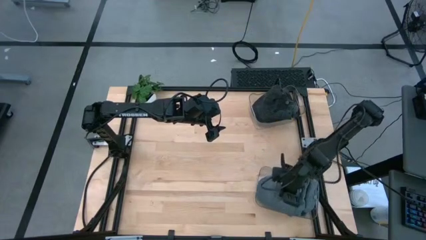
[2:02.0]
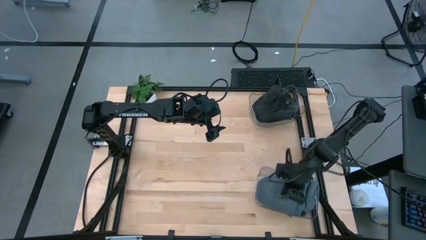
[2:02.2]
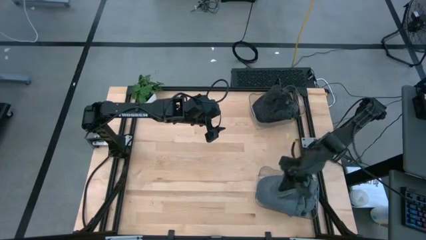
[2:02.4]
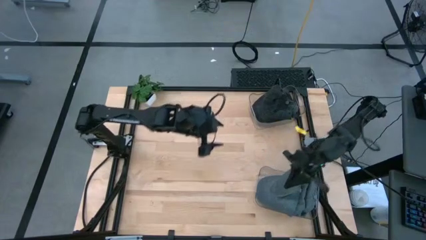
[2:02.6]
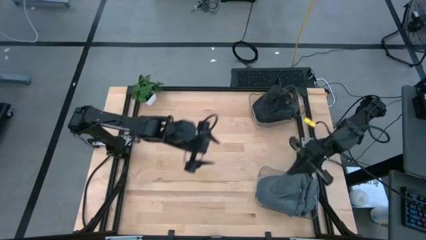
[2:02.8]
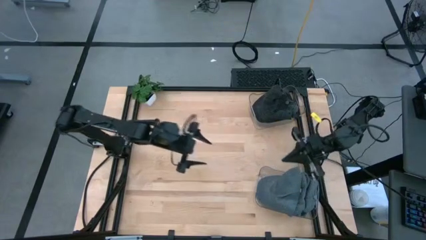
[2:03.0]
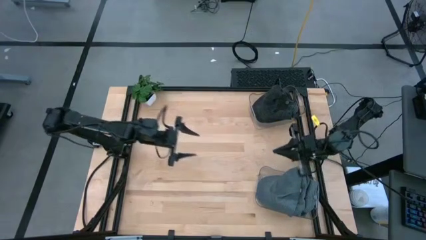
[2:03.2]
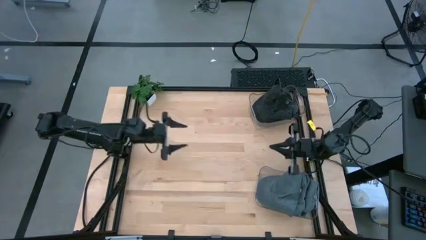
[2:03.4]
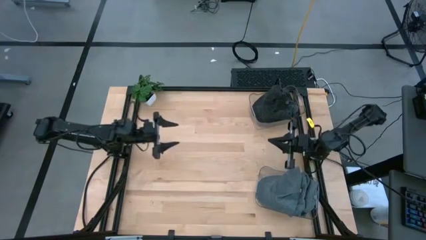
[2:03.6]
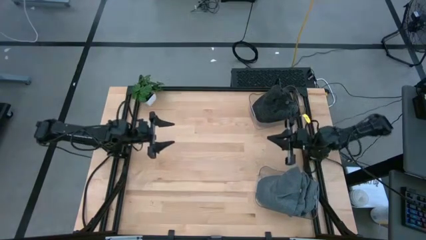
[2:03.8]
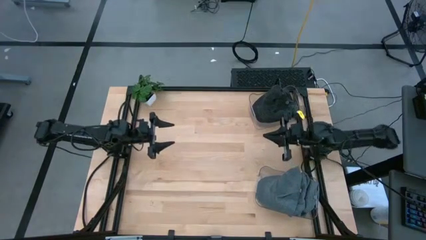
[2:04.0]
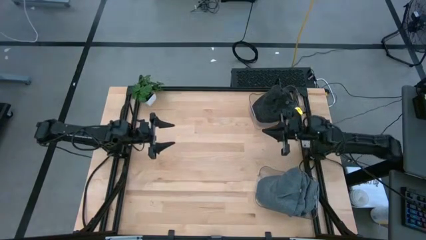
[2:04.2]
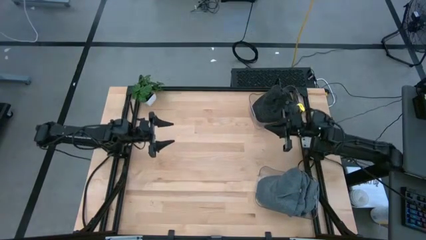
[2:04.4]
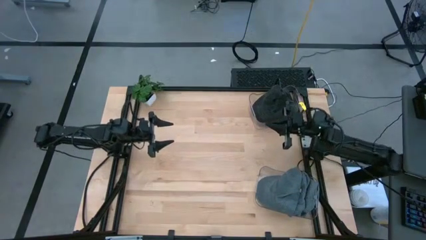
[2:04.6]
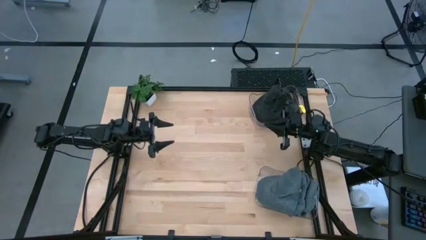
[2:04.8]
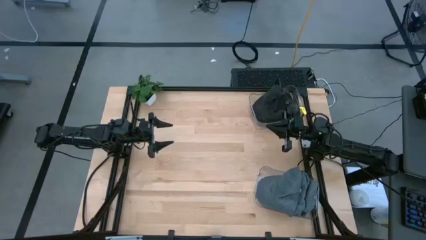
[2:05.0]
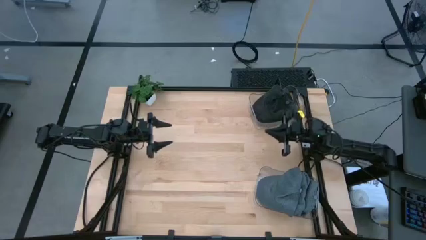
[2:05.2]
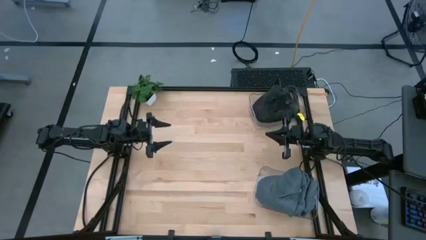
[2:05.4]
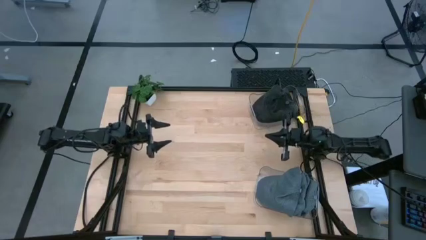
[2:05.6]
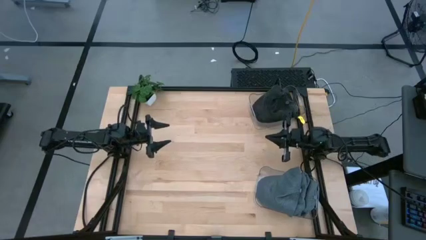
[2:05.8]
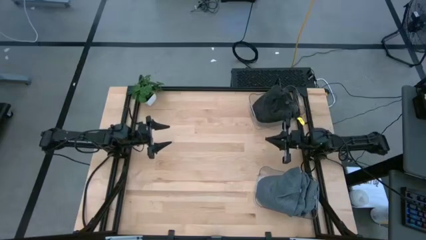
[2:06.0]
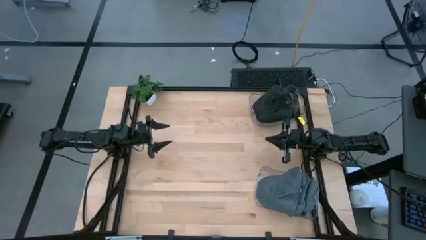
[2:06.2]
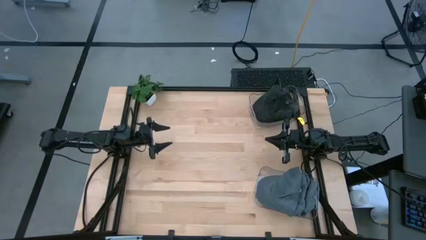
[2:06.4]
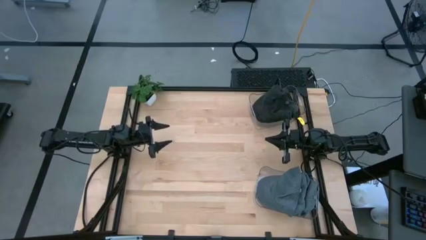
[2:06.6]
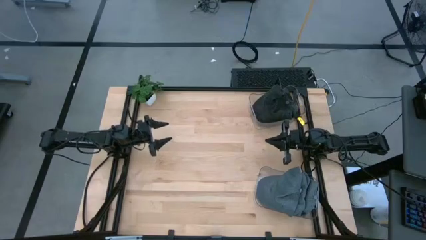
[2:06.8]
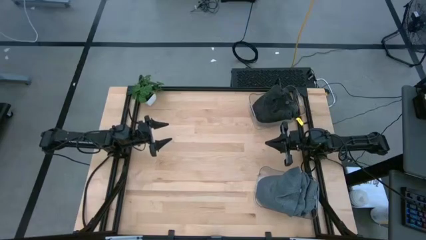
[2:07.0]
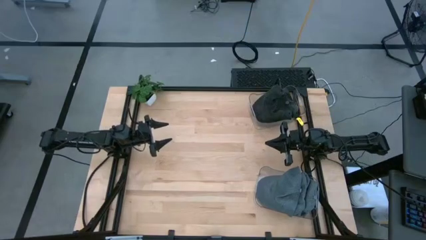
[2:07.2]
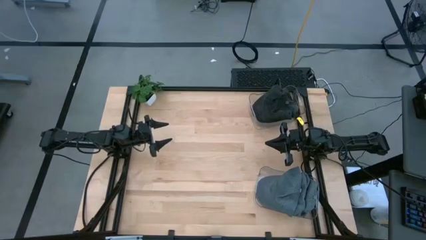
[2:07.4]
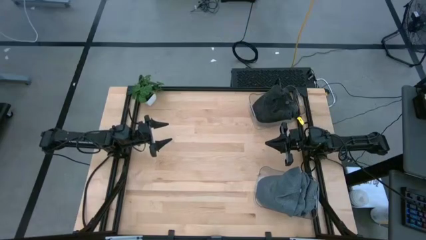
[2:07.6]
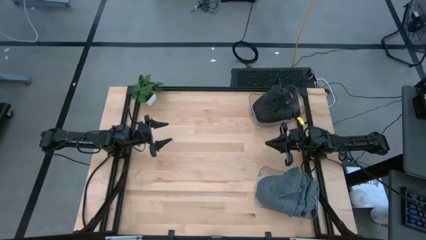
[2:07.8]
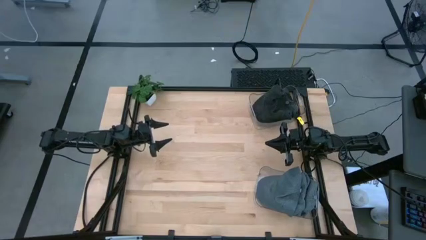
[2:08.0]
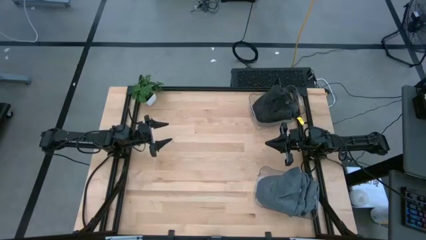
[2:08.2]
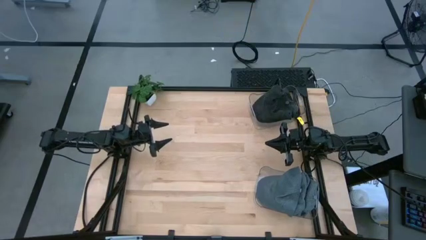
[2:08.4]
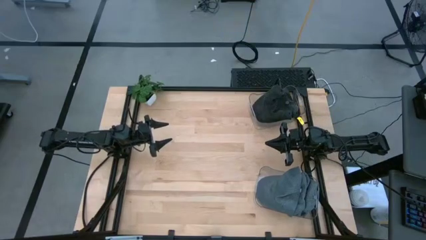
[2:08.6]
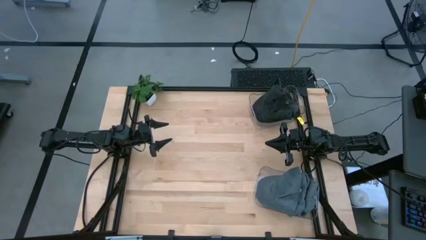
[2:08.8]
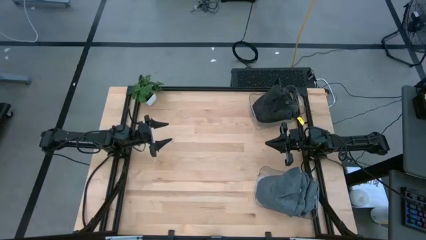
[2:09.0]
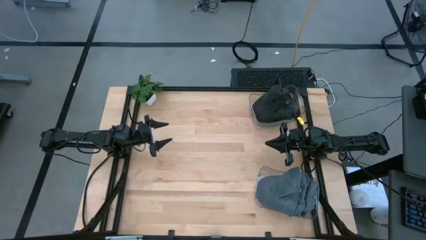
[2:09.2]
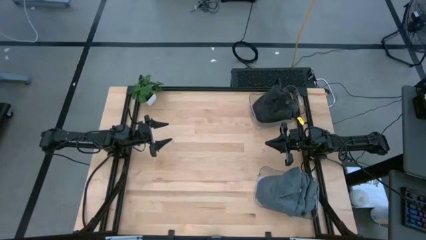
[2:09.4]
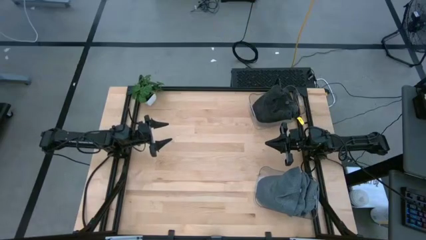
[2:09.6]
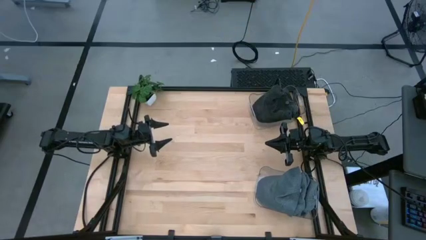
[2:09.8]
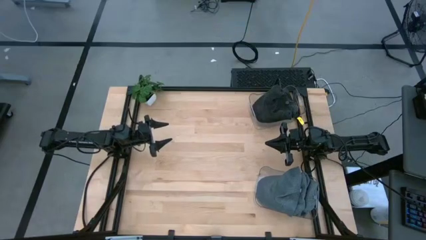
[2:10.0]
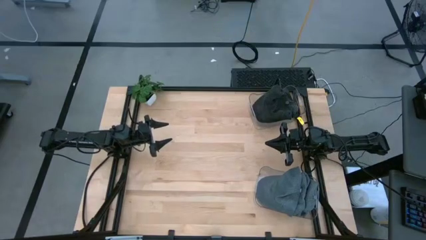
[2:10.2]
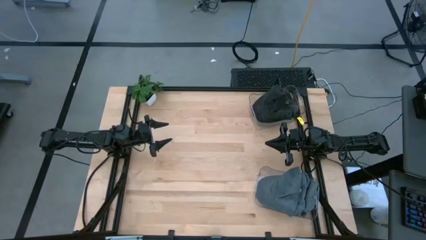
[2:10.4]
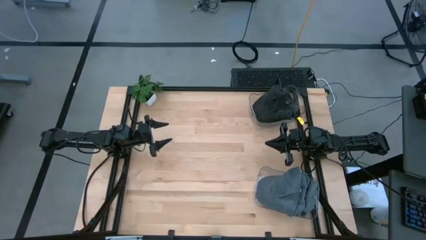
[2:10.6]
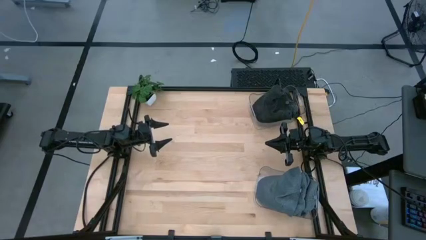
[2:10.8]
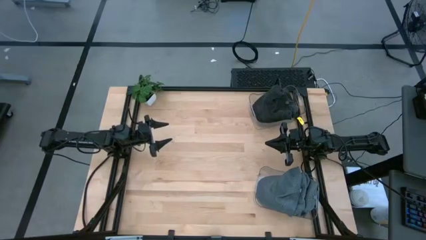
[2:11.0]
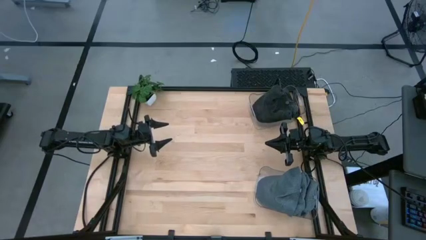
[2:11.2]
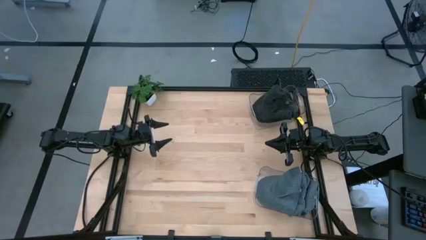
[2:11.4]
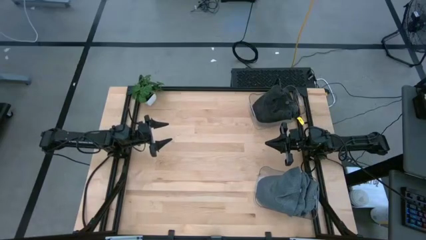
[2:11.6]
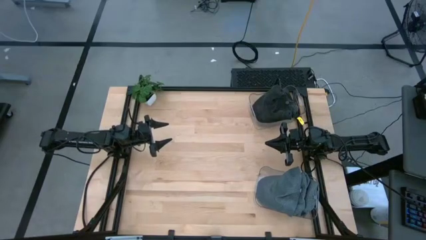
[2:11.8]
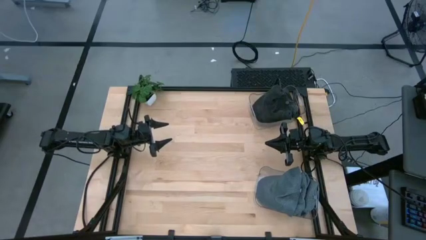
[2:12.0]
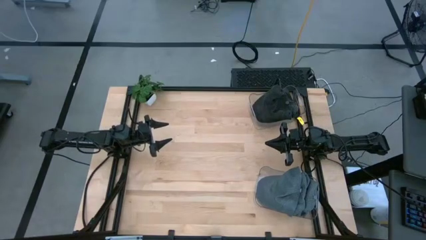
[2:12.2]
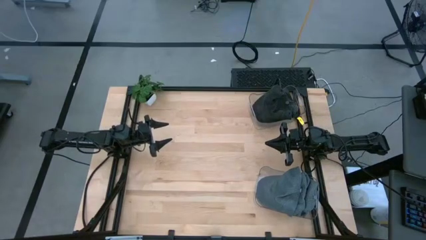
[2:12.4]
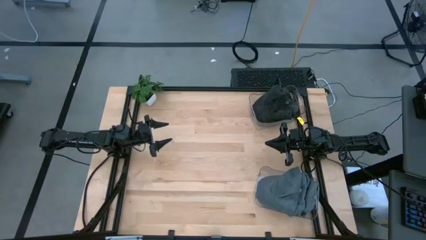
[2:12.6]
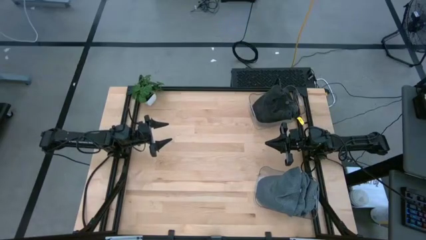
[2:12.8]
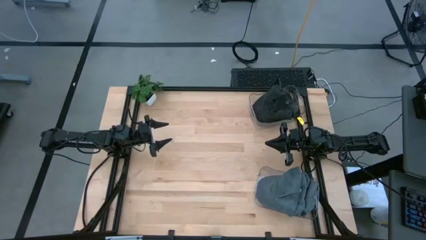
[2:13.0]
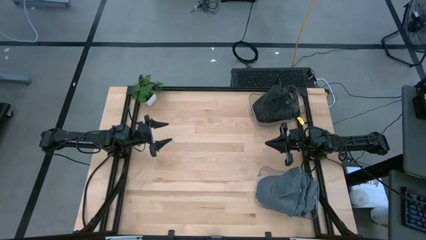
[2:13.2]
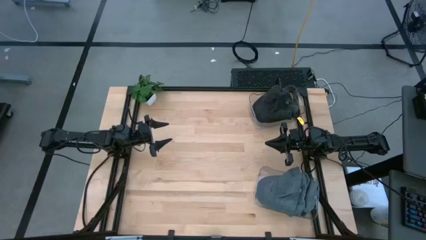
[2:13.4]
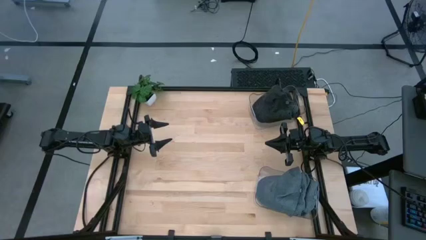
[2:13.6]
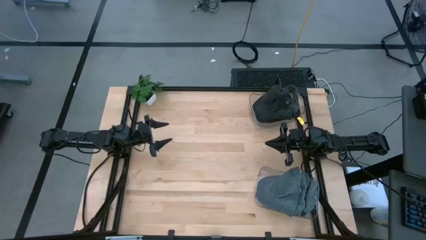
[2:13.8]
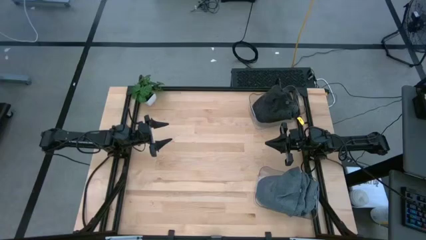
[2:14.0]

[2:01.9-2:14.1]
Task: Pick & Place hat
Return to Home Position
